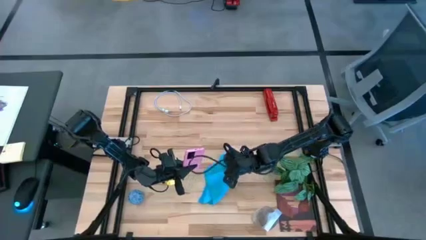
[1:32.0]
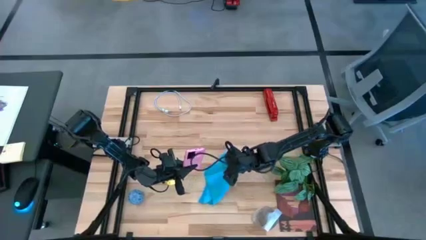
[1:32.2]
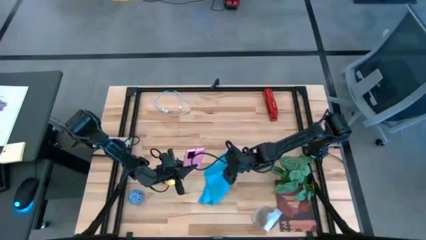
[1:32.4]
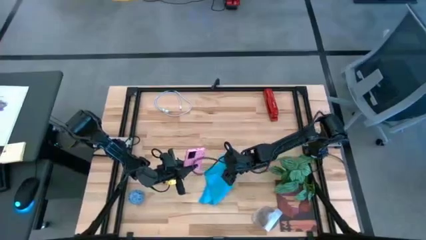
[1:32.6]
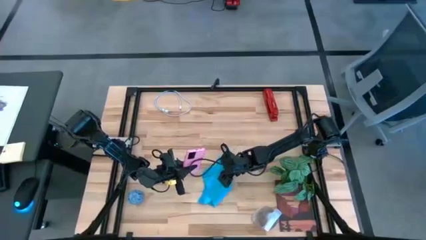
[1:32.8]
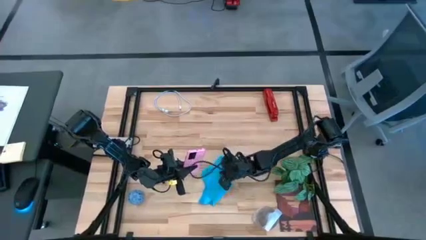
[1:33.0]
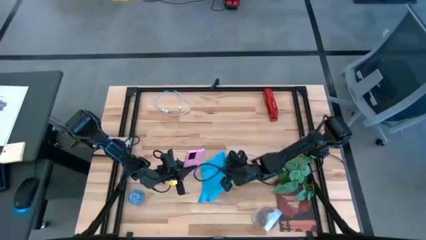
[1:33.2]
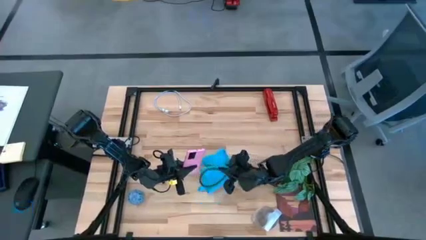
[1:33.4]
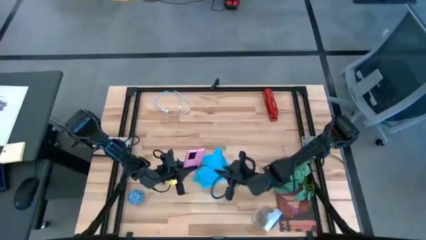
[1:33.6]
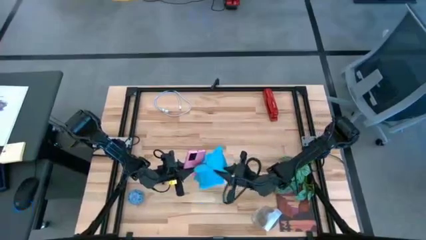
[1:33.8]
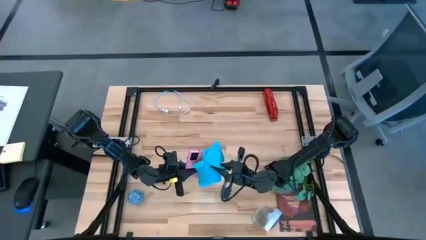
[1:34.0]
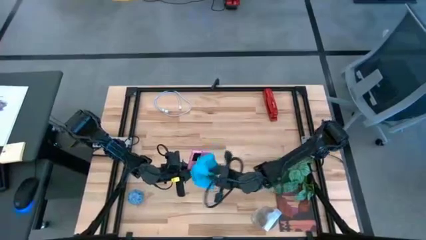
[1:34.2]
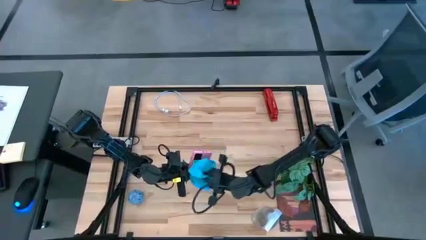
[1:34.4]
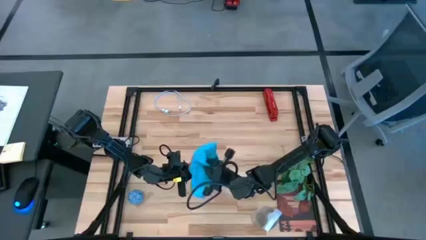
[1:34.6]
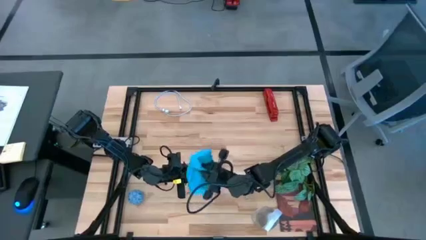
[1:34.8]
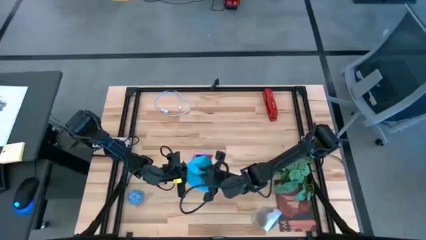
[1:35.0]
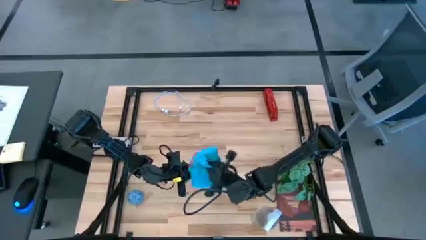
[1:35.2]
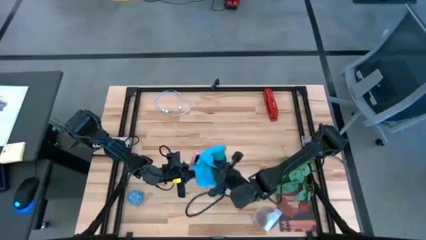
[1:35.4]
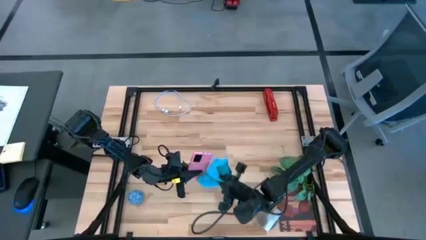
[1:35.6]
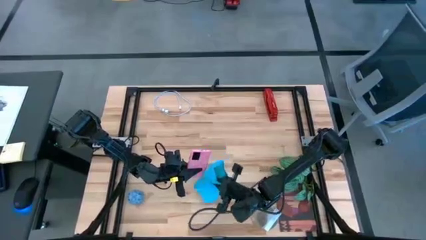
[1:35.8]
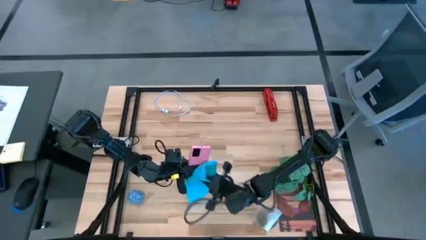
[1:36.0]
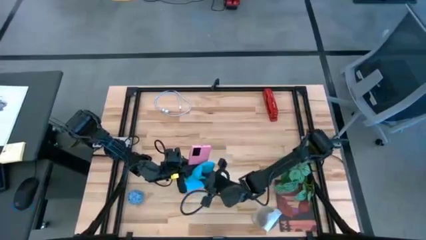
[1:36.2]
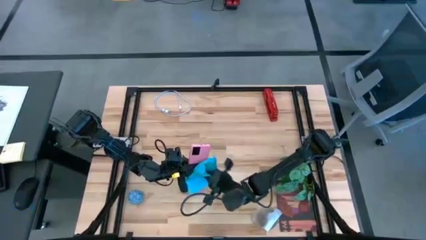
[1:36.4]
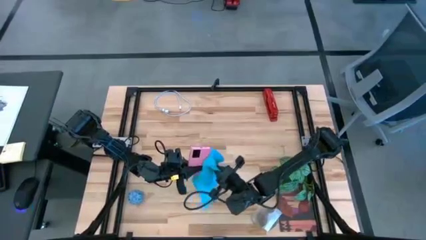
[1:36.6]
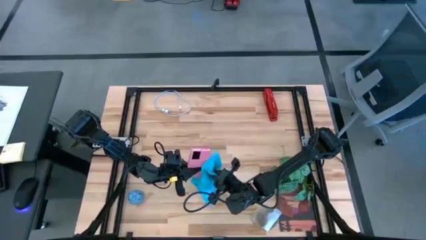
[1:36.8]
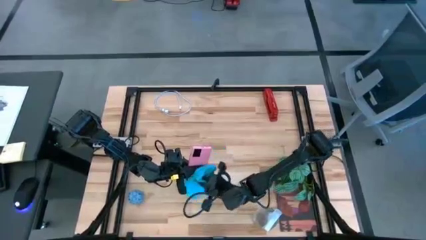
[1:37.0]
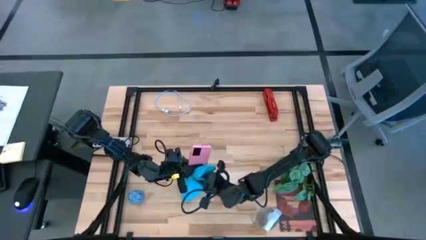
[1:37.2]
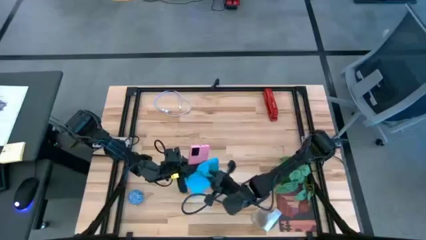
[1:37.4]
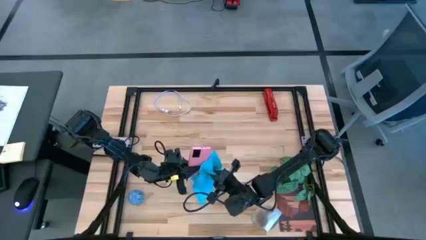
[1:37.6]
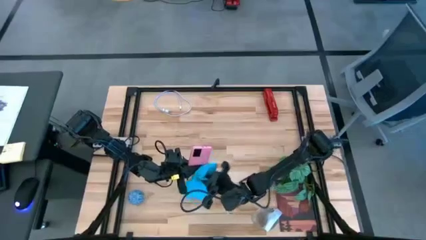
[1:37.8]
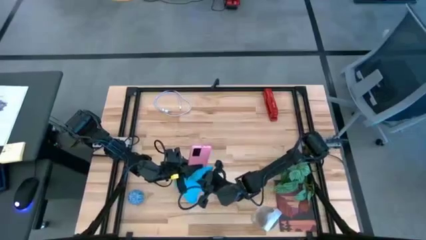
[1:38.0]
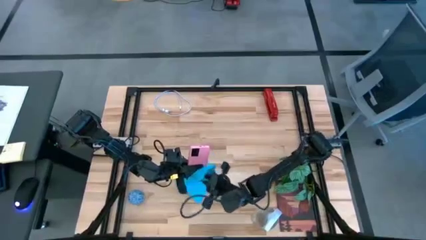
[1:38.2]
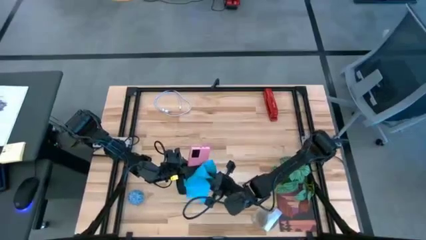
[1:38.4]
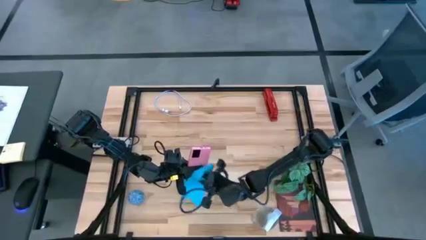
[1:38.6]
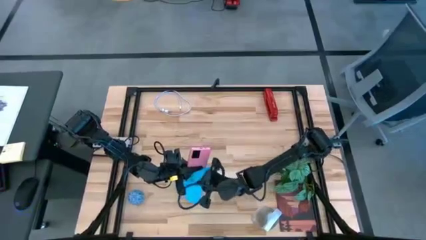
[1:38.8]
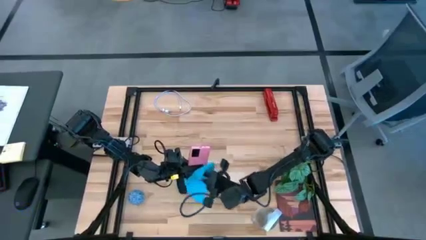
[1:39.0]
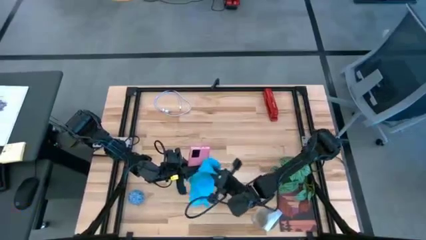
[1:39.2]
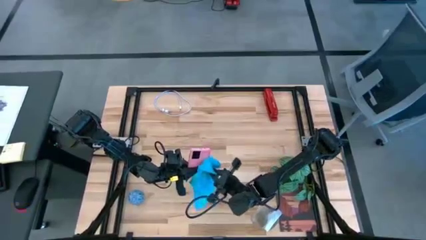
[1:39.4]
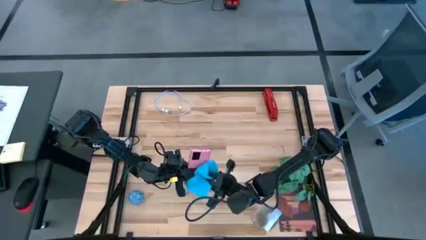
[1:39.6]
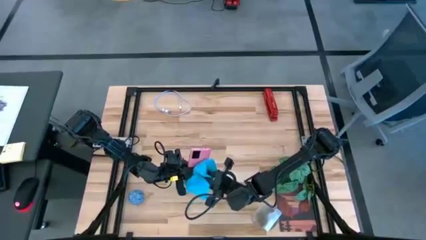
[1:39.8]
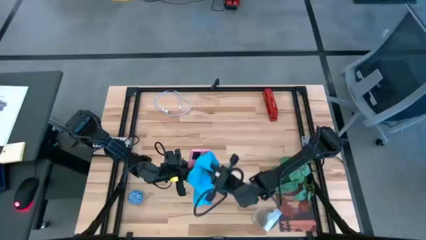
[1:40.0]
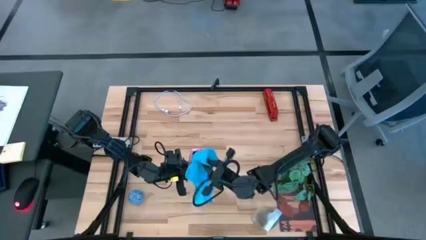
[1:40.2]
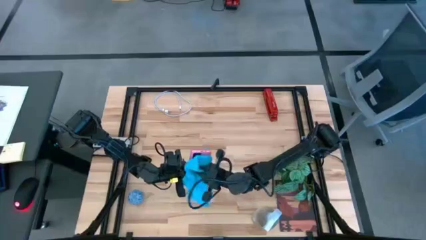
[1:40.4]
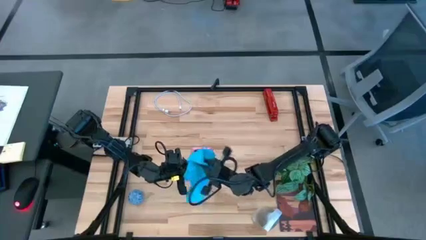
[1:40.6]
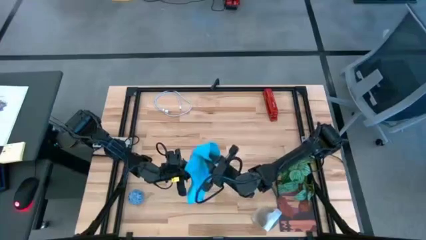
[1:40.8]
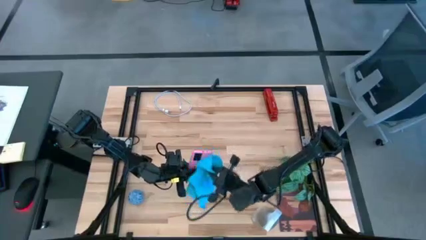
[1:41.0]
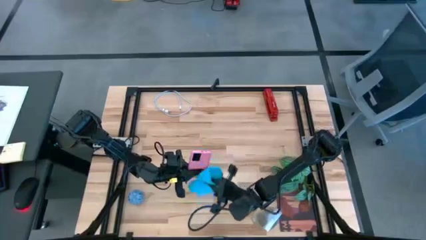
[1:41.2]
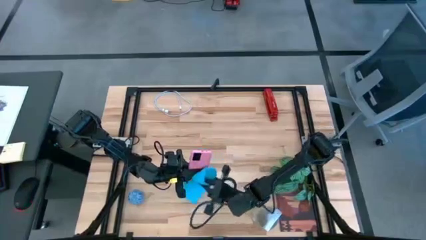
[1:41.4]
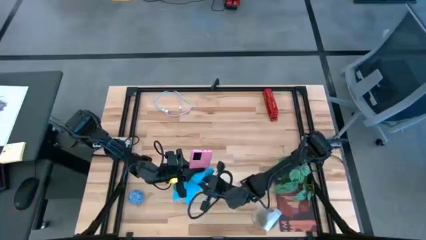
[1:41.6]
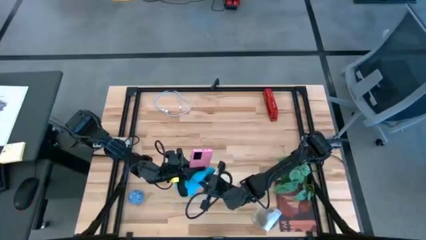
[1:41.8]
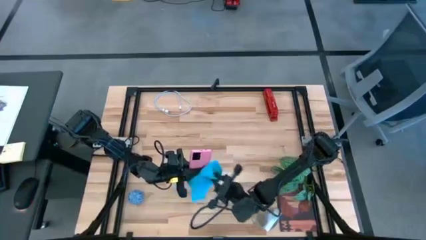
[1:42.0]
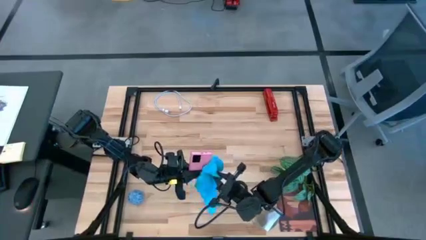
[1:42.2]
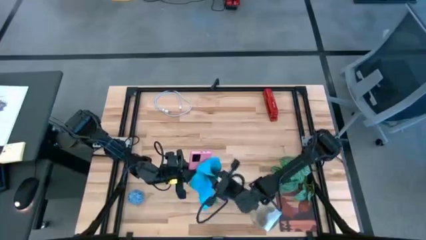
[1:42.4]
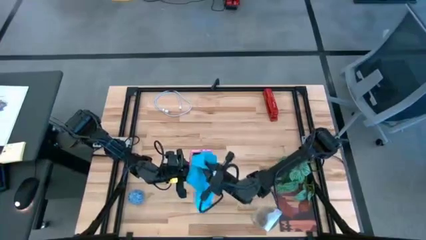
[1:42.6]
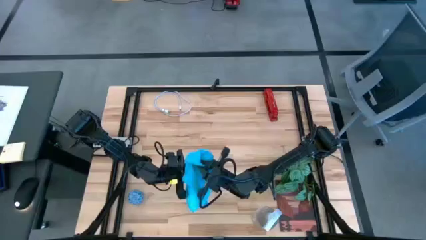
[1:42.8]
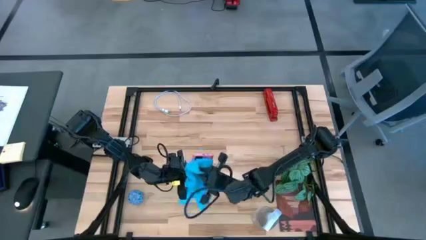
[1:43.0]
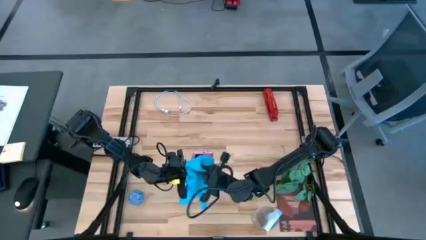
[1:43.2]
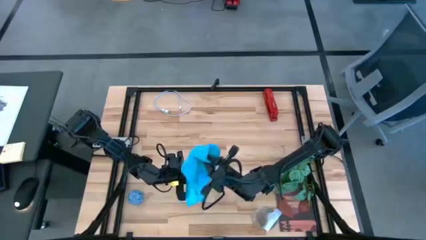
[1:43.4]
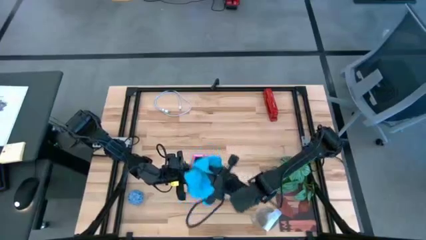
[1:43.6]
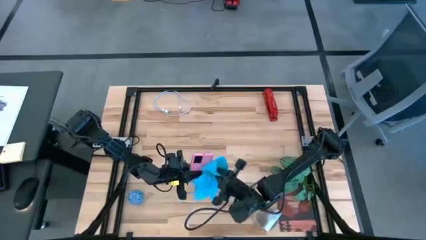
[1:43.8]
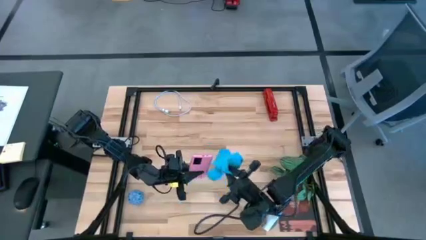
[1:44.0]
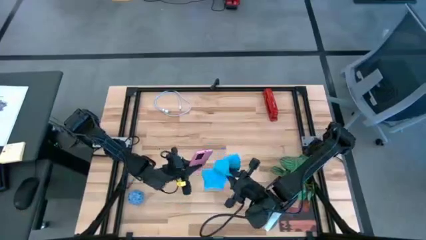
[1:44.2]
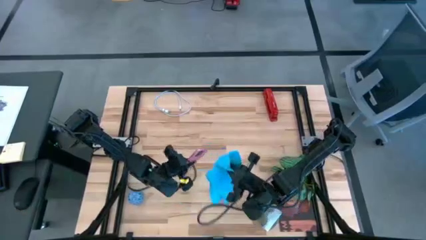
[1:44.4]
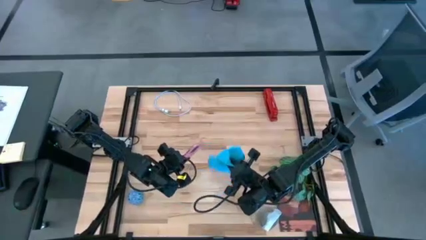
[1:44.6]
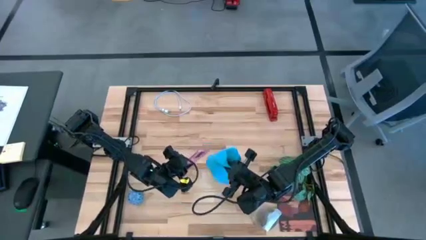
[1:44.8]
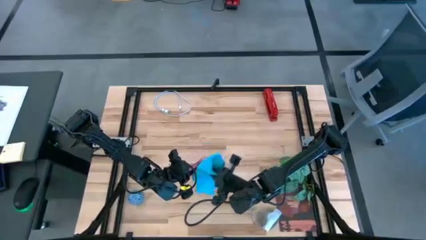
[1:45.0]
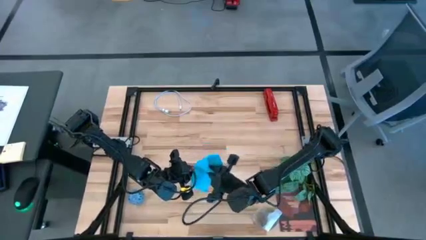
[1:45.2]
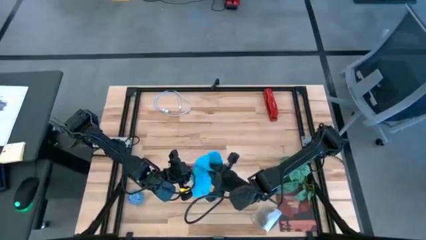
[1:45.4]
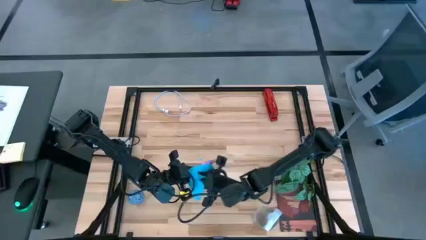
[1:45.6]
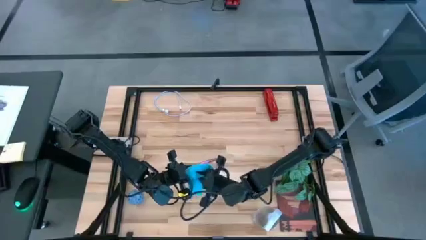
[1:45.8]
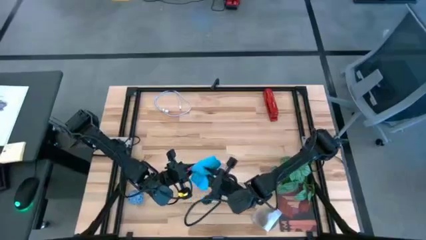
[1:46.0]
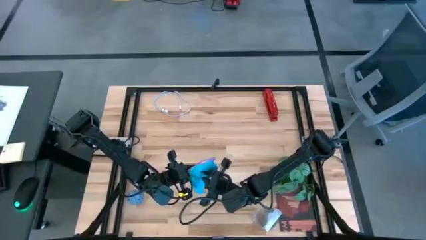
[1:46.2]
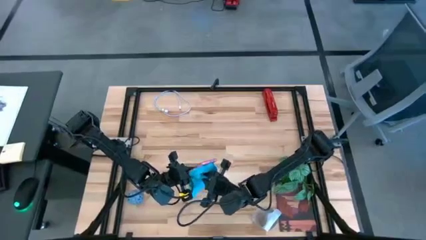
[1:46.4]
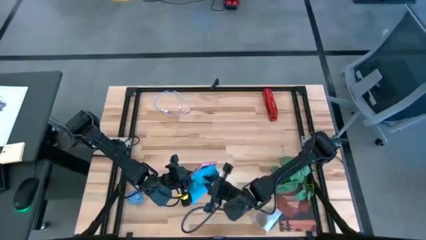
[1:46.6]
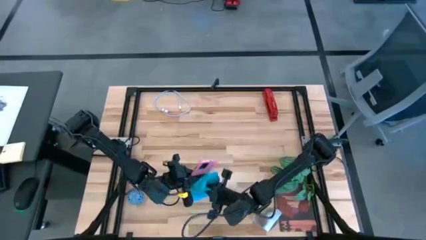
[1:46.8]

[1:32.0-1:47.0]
Task: Apply microfiber cloth
Wipe the back and front of the cellphone with the blue microfiber cloth
